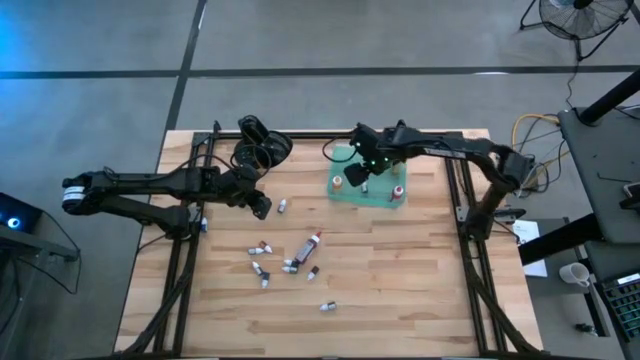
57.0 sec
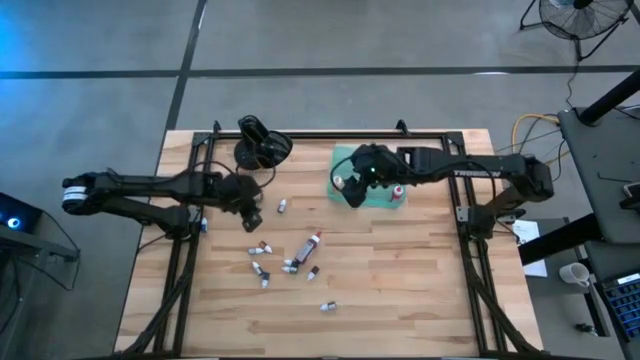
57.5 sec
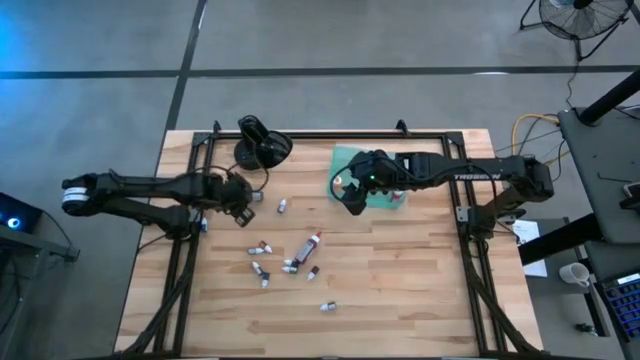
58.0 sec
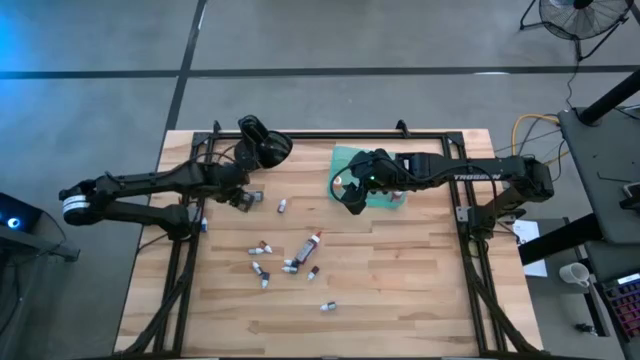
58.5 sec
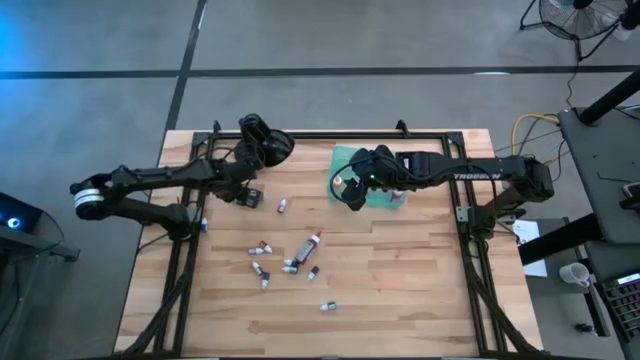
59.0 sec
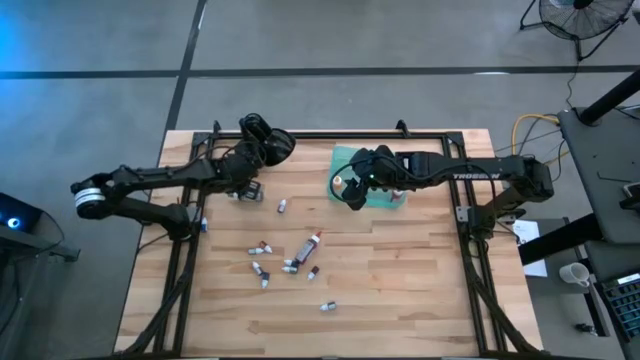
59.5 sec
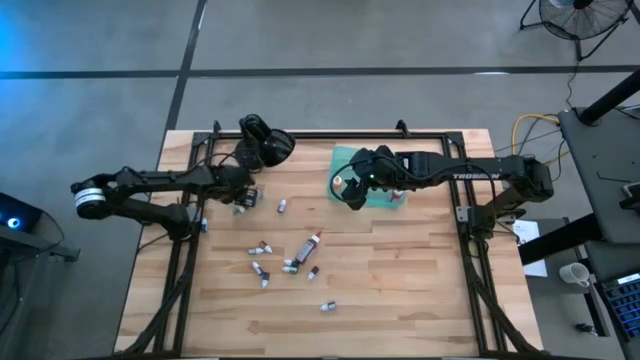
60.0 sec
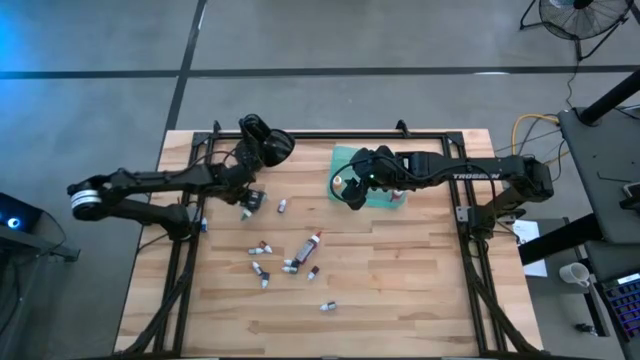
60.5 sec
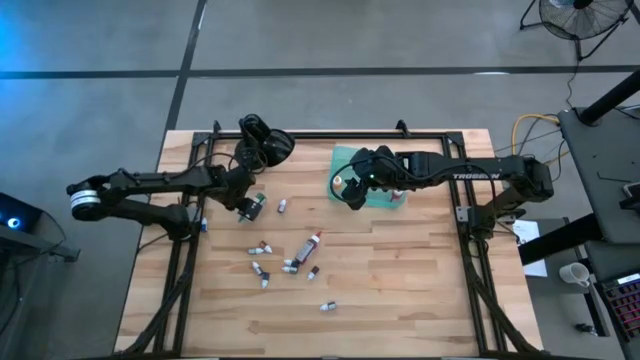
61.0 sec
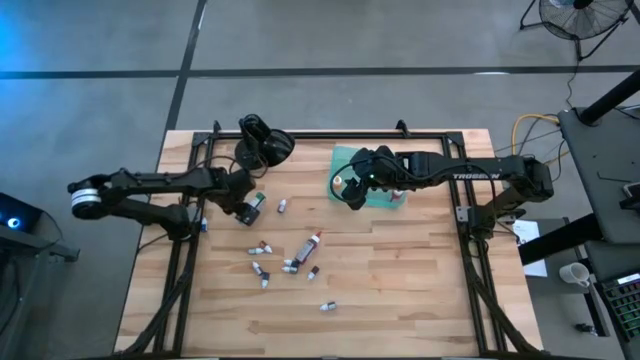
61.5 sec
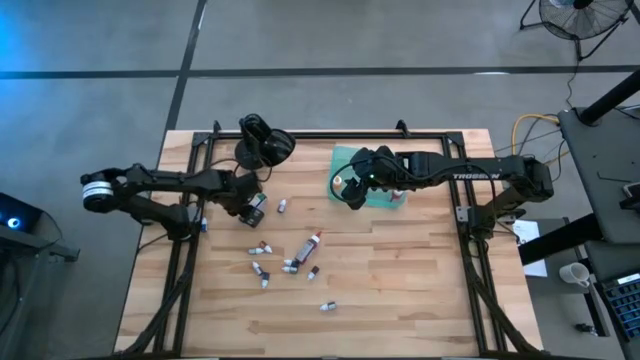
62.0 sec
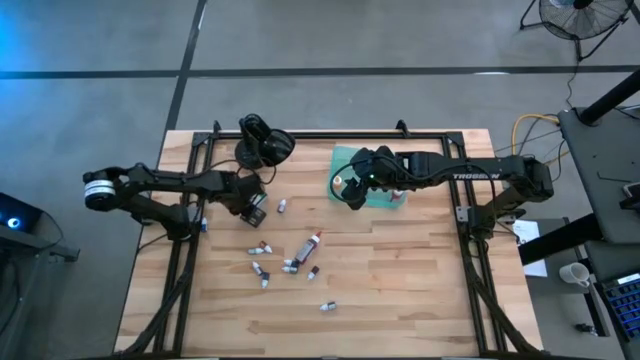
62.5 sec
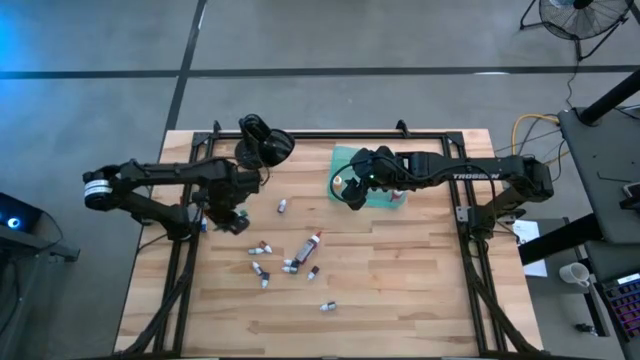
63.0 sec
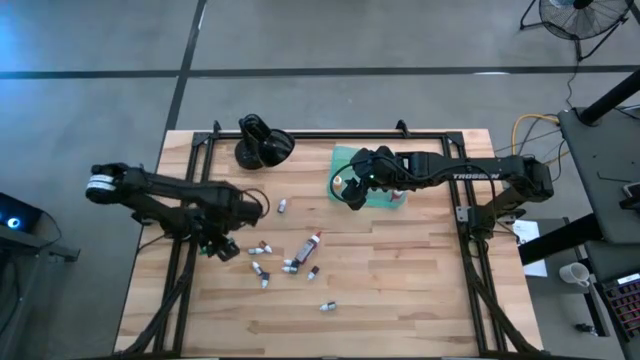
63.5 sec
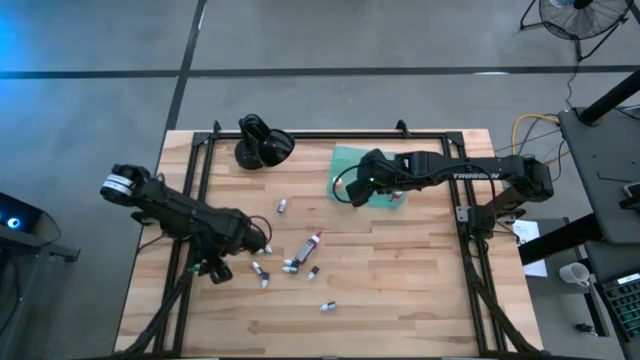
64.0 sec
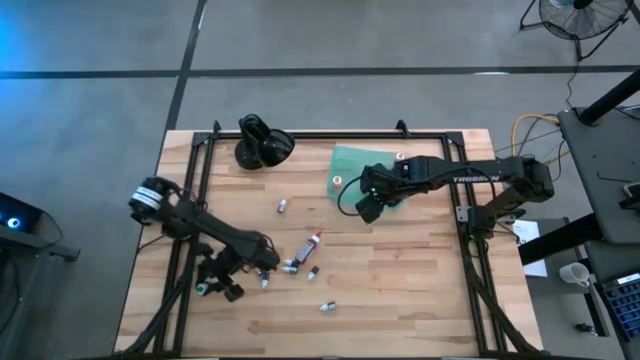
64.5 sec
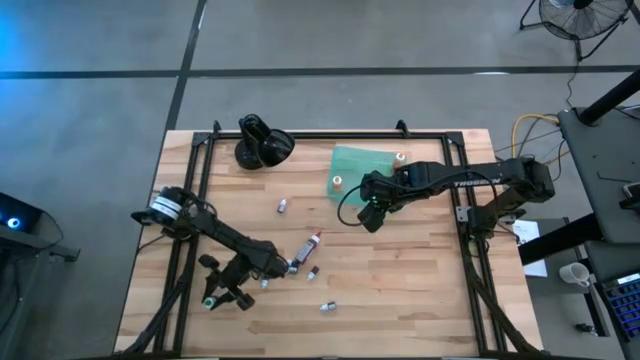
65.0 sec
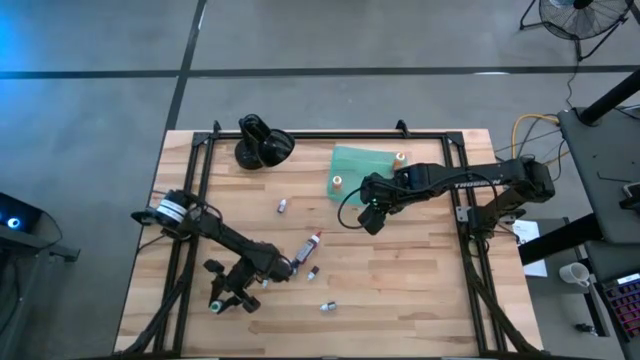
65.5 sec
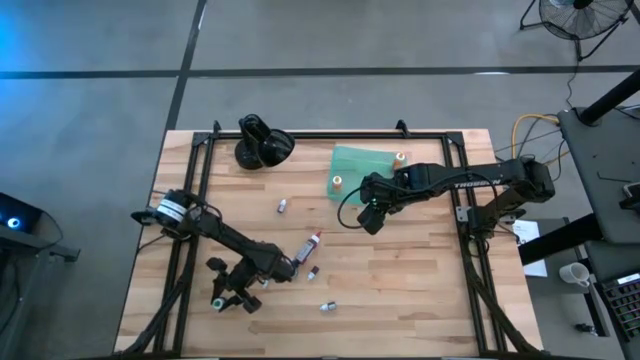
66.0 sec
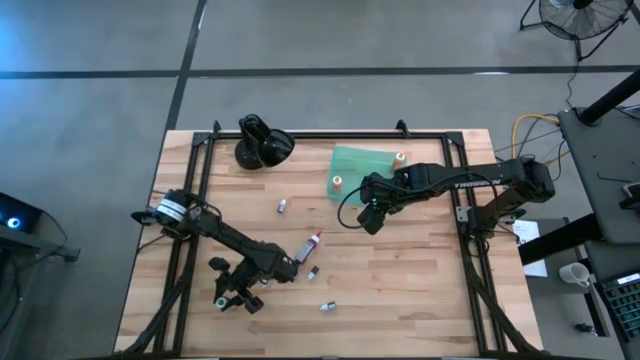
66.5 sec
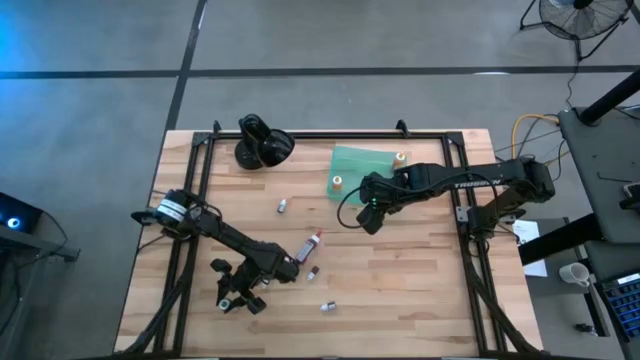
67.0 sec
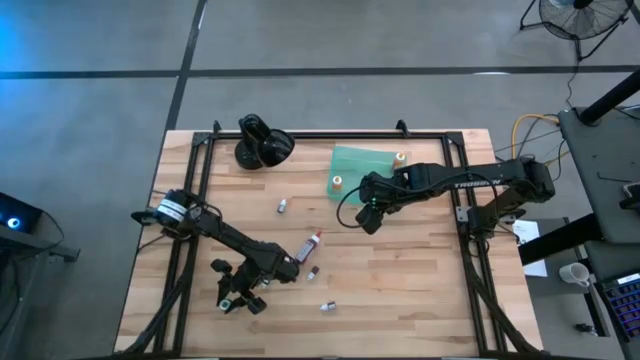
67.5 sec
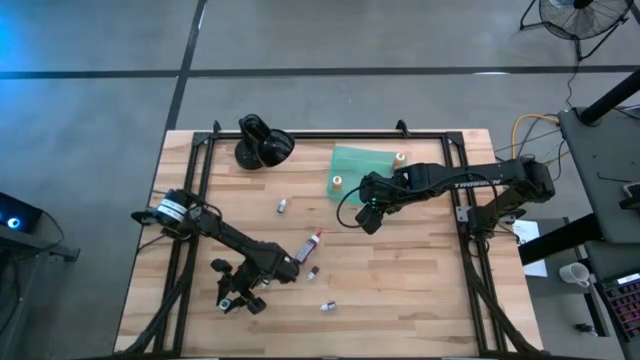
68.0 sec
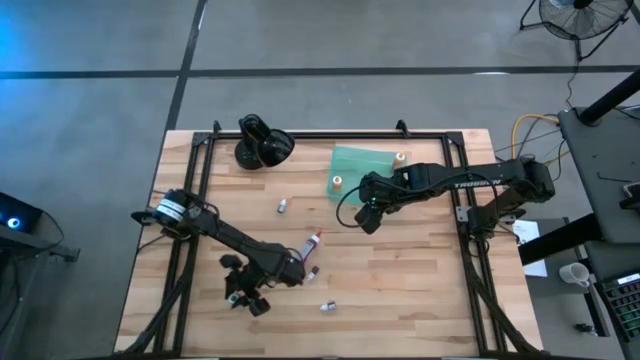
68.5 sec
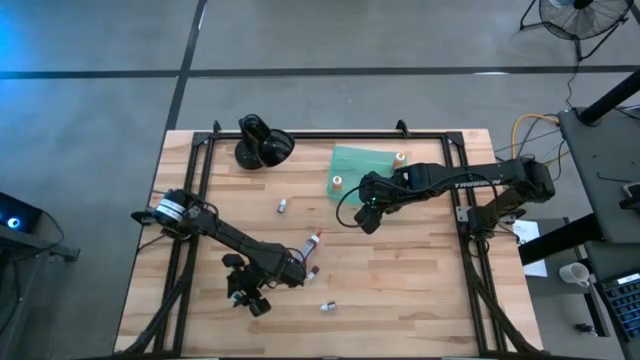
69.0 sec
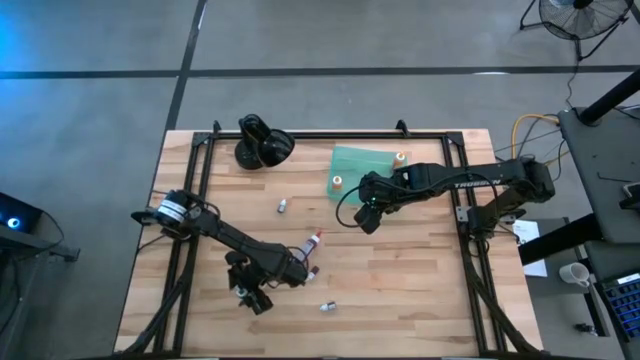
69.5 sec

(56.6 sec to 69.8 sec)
Task: Pick & Place food coloring
Move the large green food coloring bottle towards the bottom left of the table

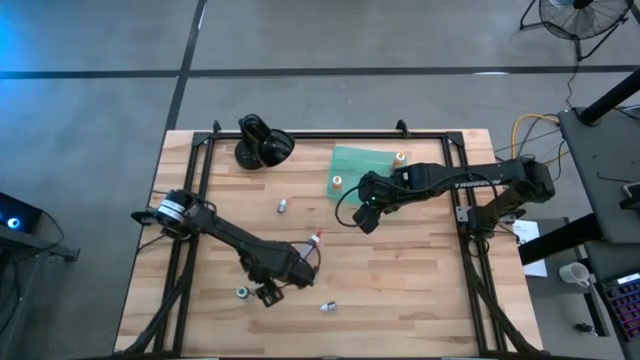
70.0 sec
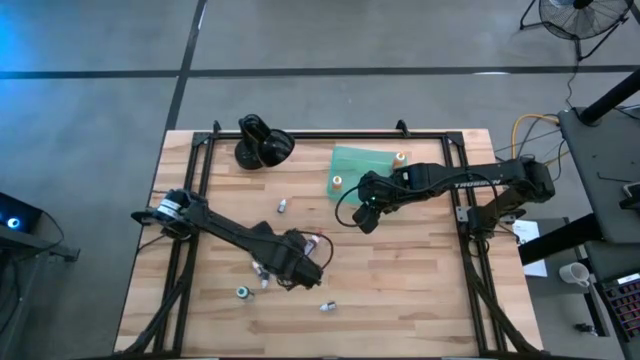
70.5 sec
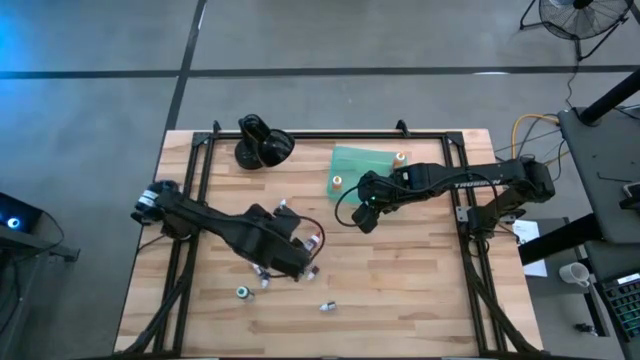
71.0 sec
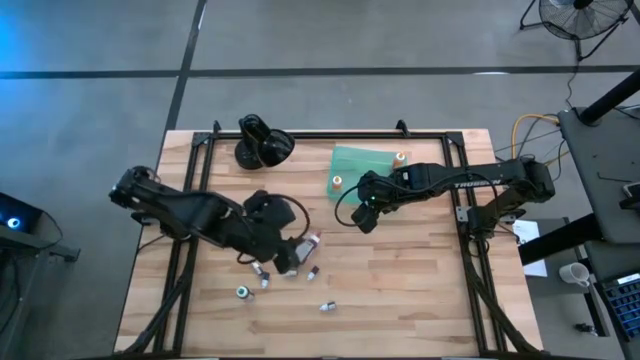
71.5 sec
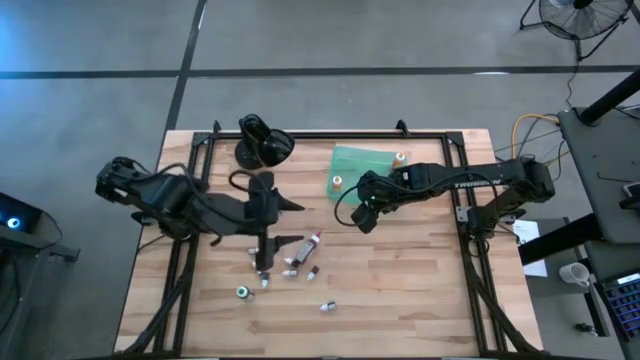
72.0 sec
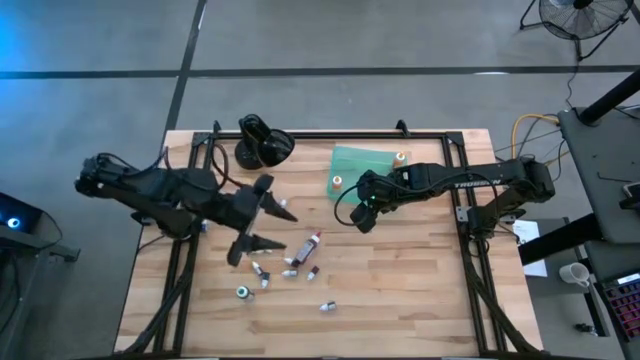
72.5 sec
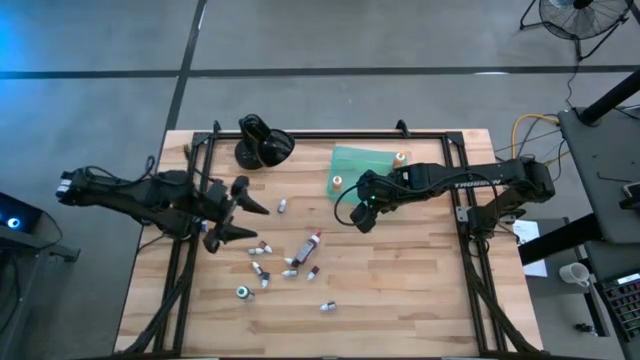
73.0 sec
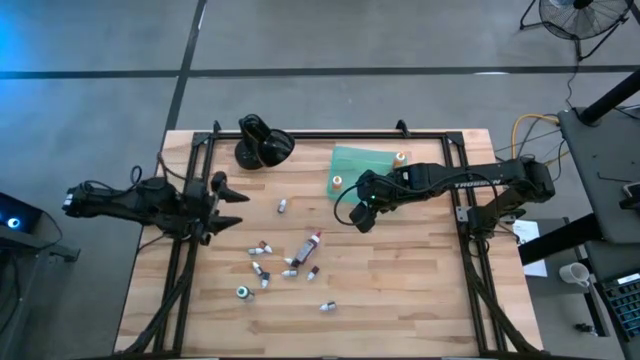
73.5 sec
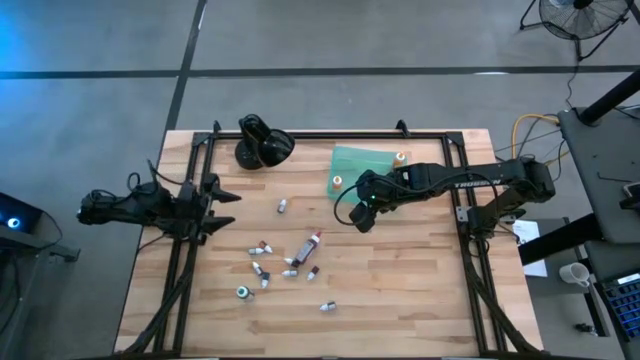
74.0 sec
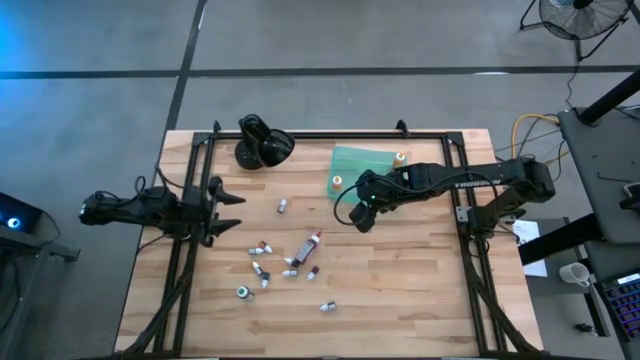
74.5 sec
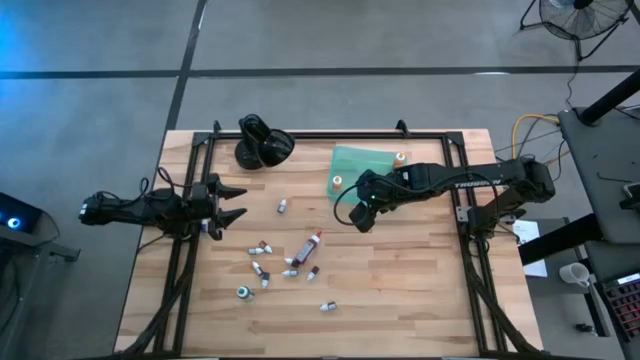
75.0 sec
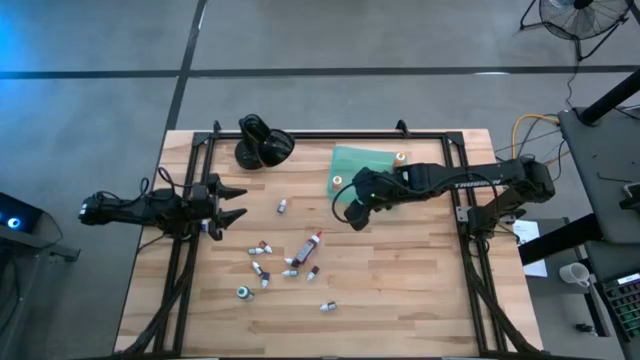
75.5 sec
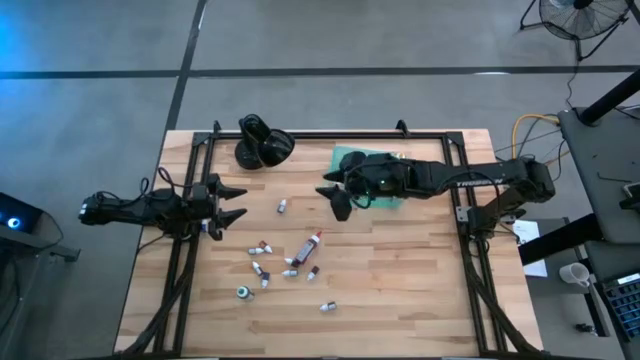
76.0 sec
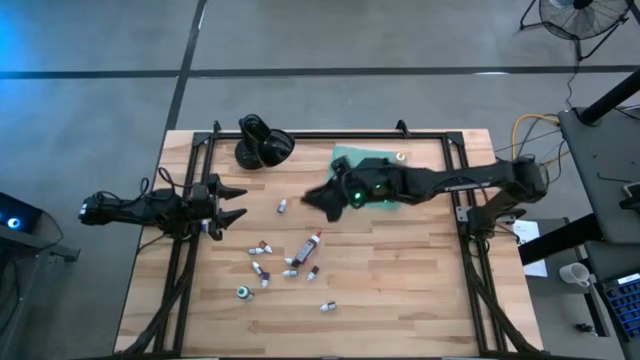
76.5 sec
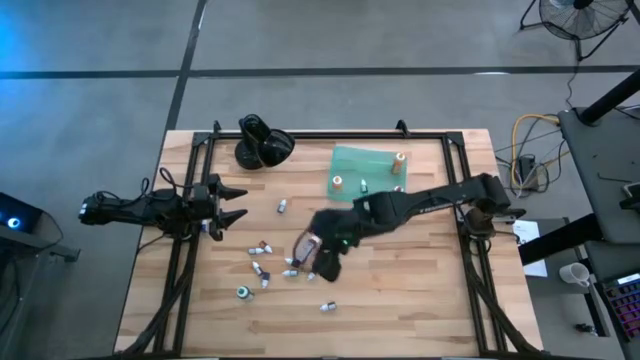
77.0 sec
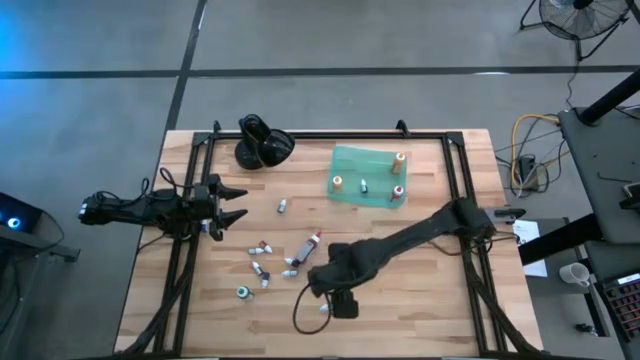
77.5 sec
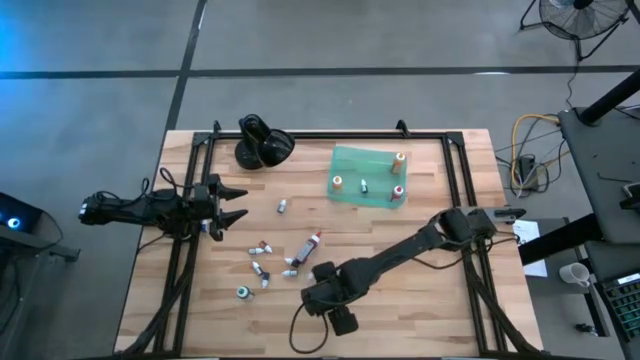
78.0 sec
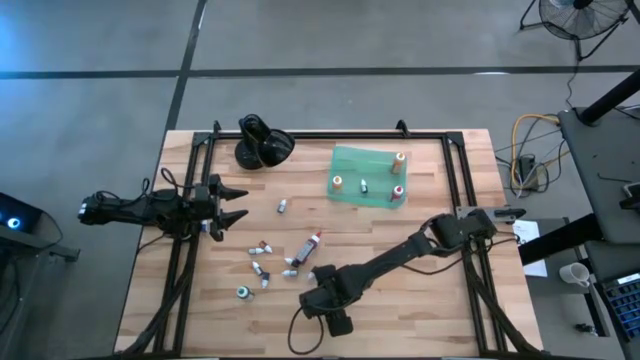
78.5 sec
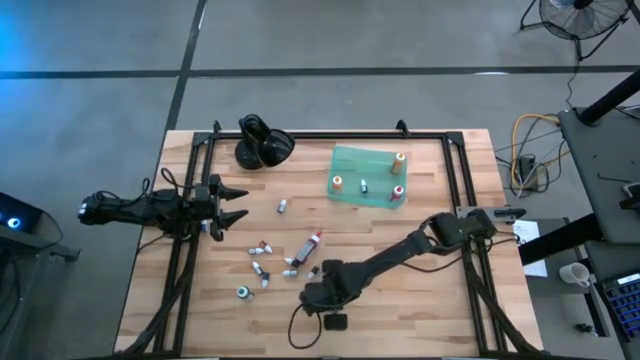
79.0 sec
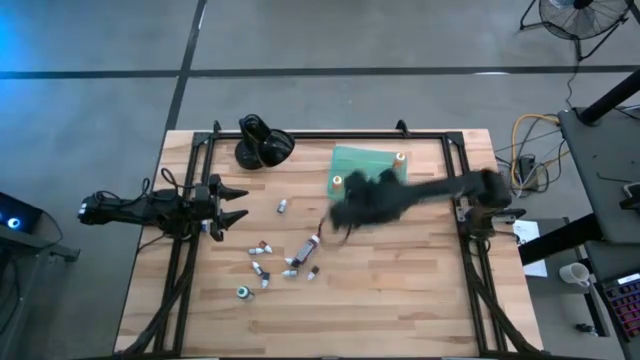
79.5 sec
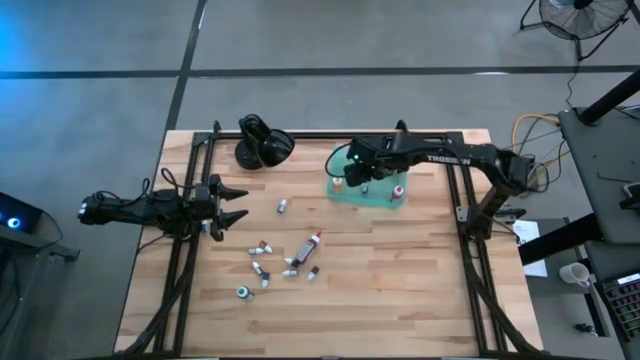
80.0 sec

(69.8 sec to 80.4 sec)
Put the black food coloring bottle into the green bin
